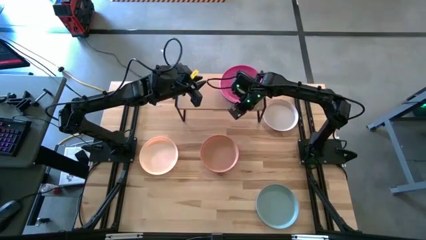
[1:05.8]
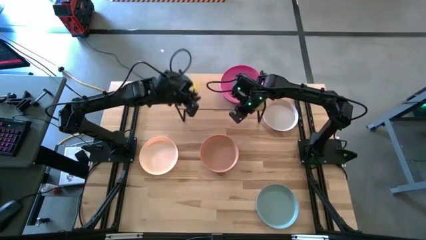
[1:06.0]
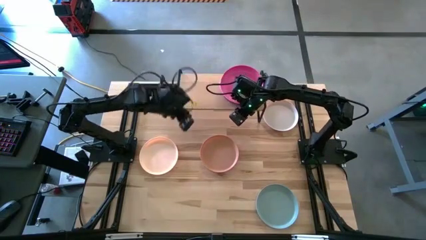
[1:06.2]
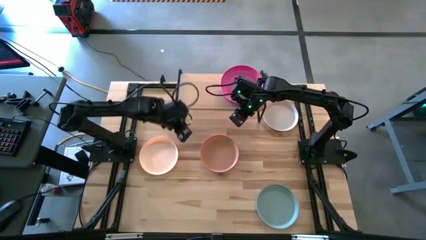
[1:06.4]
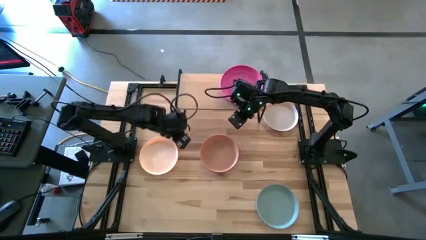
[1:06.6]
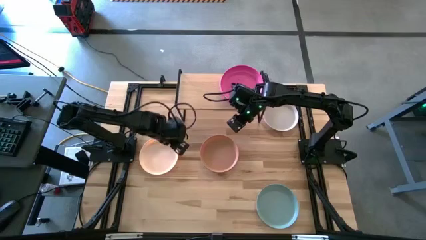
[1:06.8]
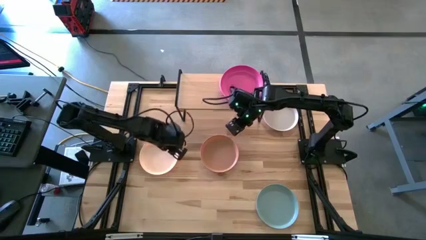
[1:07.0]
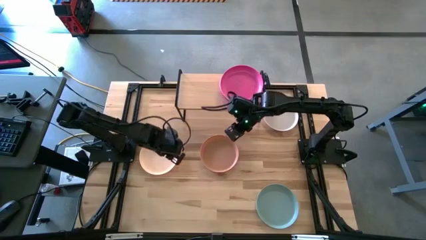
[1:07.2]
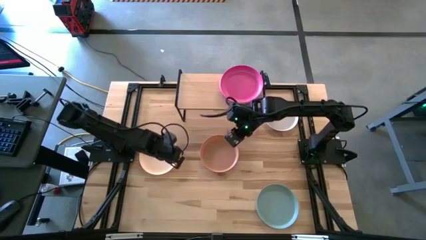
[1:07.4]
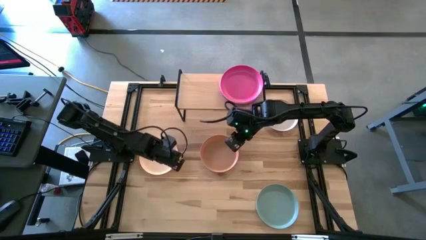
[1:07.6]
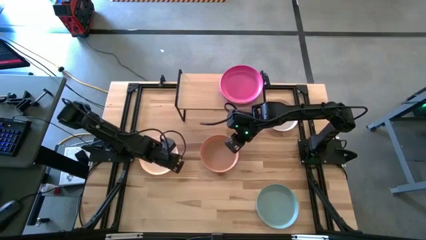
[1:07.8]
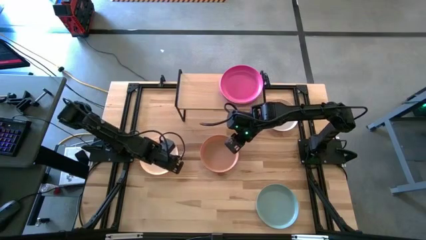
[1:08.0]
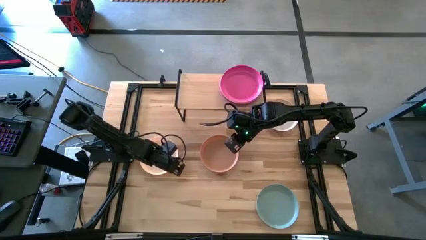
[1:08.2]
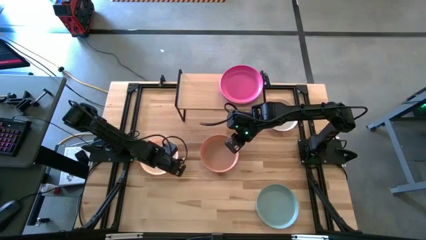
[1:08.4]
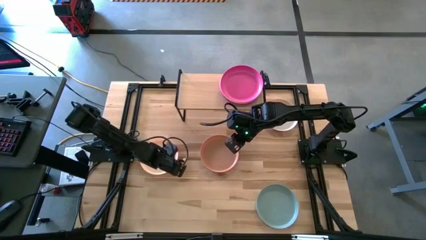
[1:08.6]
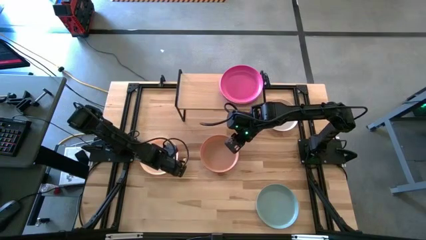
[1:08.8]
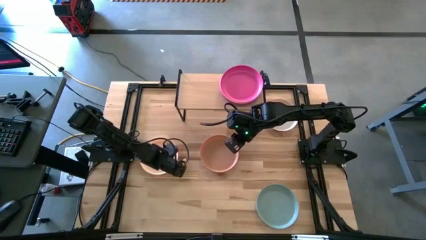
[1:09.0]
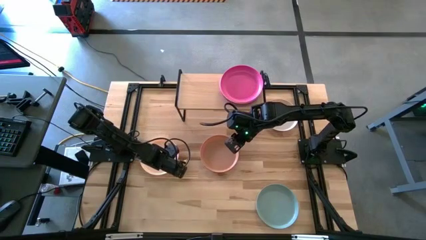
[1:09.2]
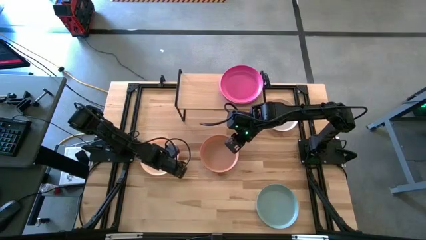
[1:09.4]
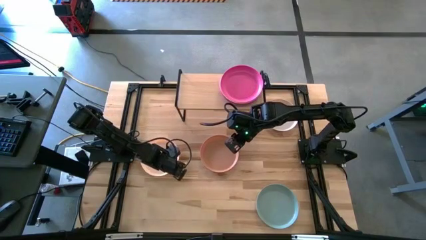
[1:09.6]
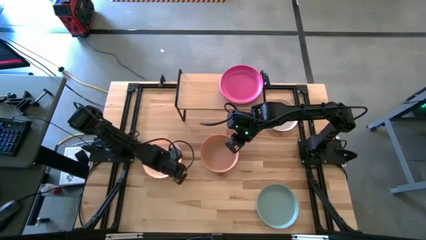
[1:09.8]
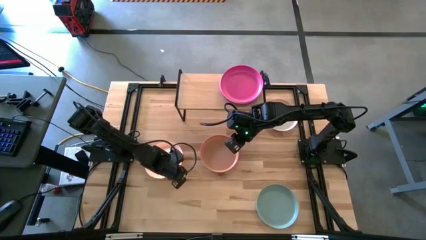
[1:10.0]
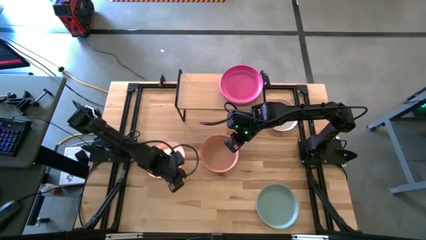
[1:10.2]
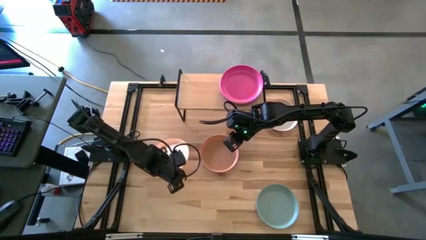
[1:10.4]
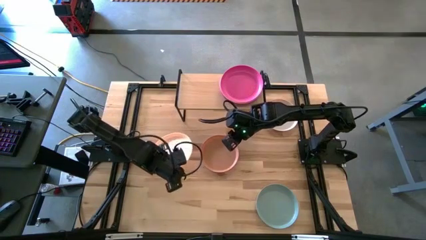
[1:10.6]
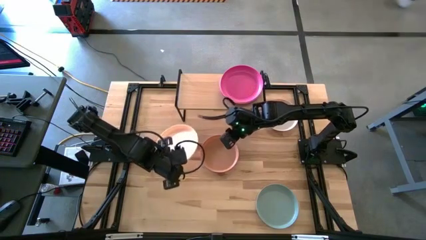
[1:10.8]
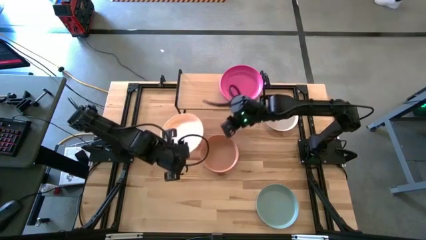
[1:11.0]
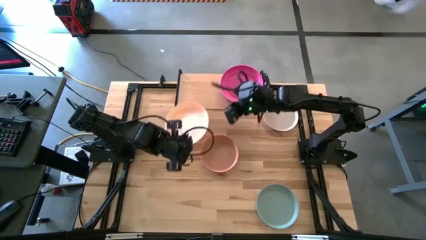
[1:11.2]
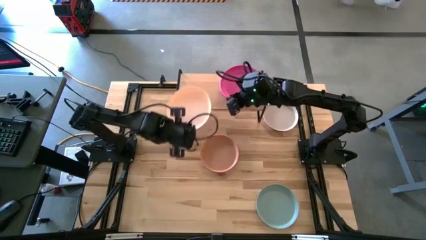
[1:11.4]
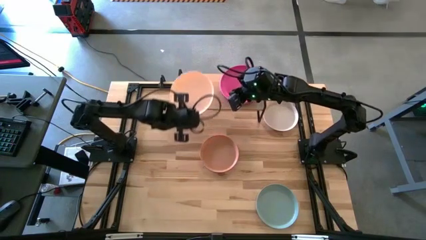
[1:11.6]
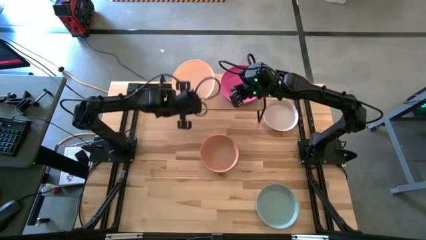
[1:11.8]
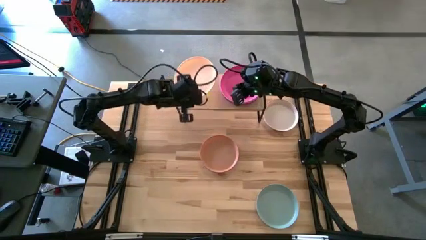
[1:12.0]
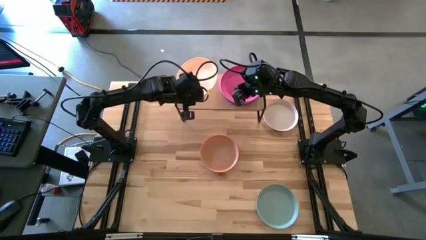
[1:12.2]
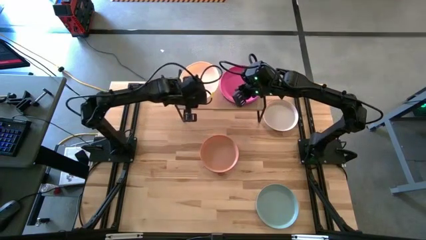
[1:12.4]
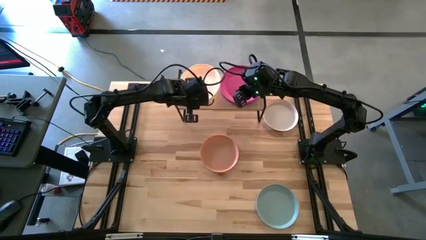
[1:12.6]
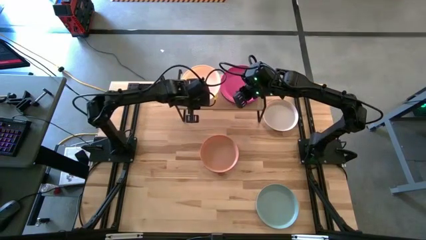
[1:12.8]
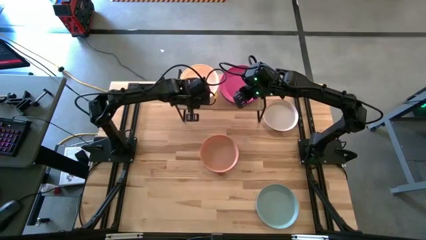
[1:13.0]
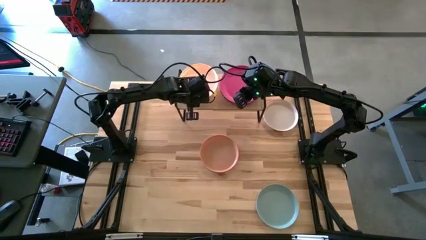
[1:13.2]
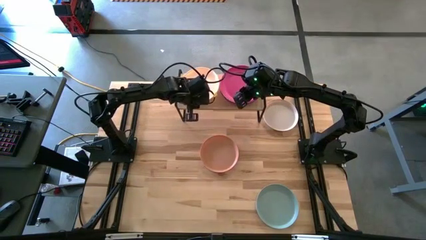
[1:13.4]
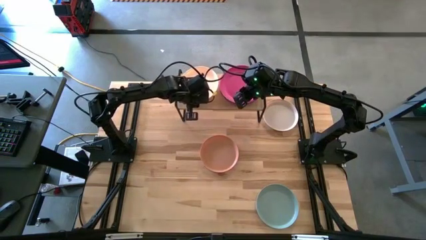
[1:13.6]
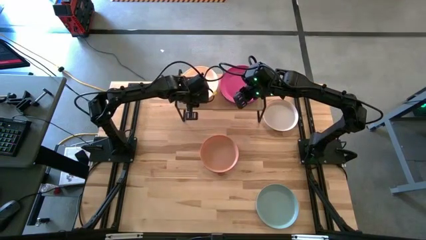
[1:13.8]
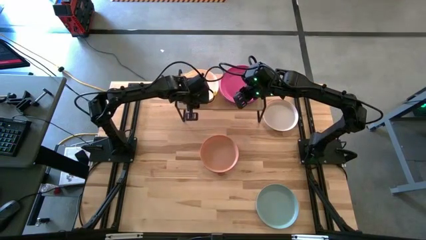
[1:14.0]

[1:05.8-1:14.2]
Task: Place and stack plates onto a shelf
Put the left white plate on the shelf

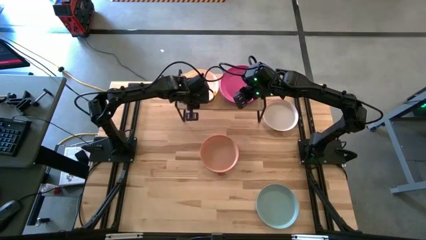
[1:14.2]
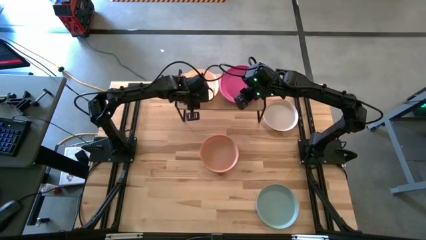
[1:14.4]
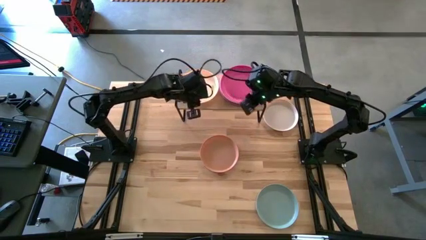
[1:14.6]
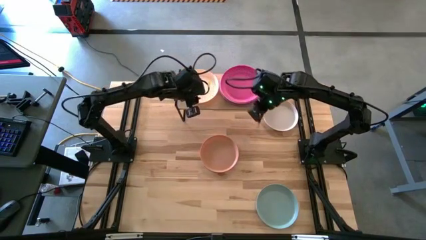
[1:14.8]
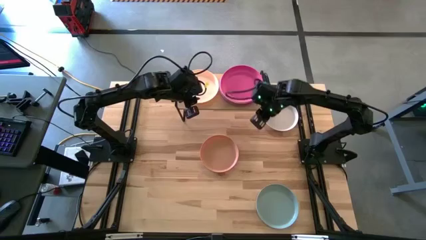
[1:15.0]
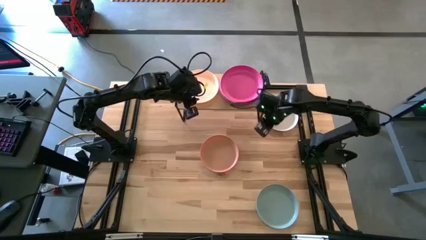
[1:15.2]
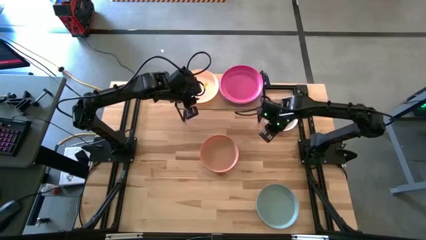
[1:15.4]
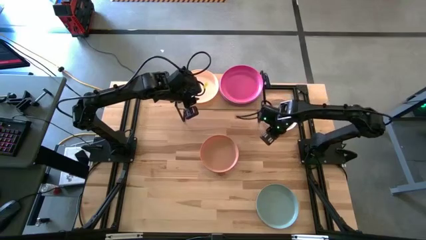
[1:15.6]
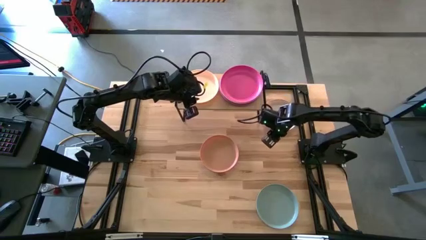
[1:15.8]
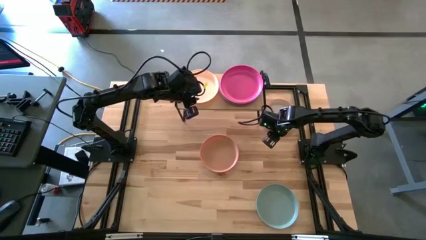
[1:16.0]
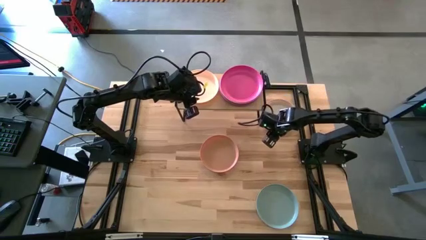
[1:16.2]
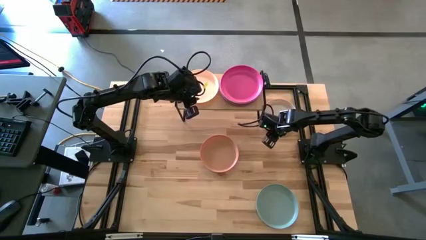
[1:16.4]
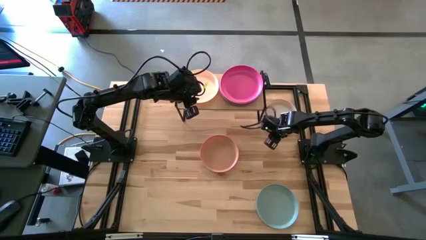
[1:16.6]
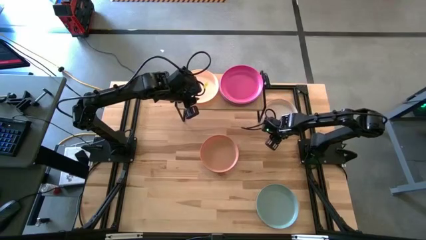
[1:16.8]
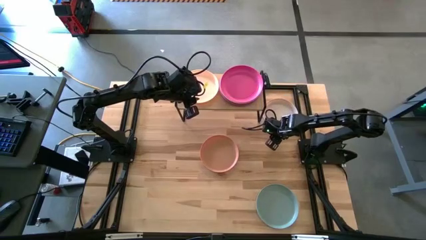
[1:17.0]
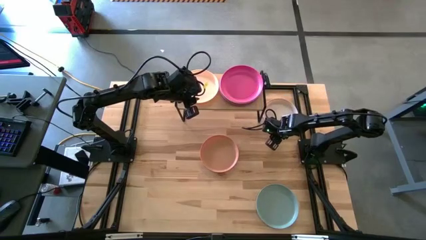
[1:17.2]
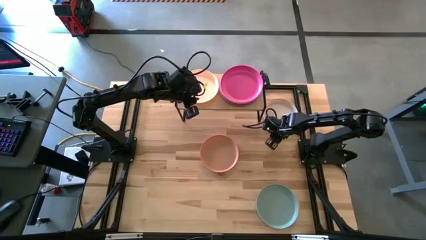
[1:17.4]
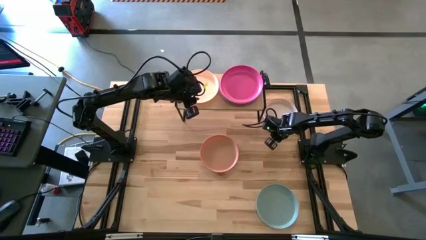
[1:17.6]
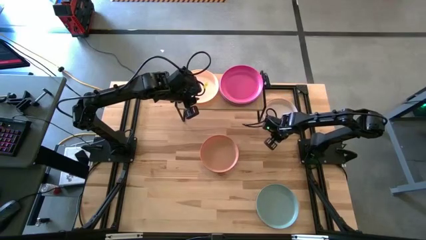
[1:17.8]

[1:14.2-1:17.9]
Stack the white plate on top of the white plate

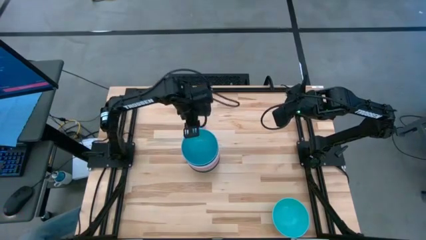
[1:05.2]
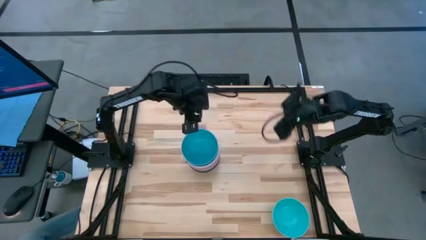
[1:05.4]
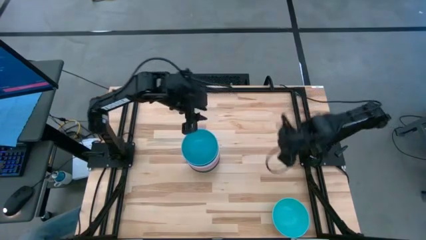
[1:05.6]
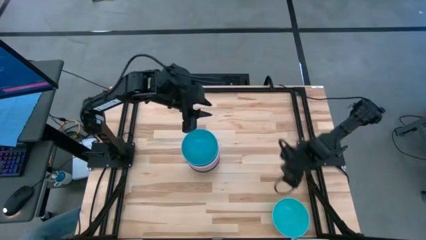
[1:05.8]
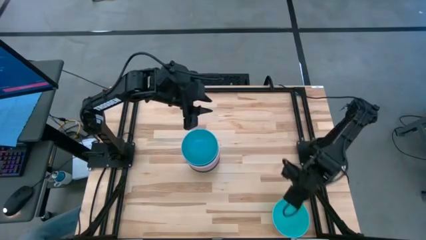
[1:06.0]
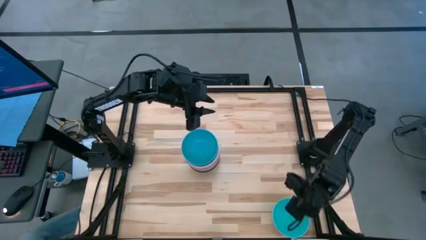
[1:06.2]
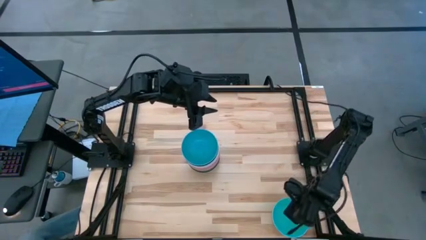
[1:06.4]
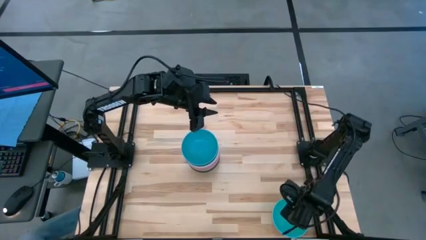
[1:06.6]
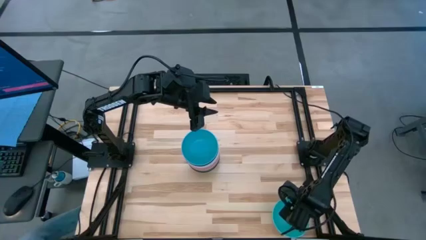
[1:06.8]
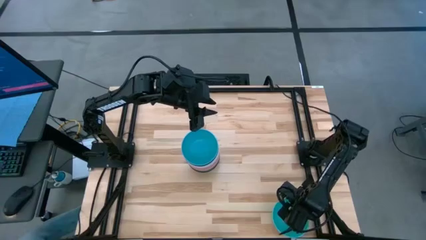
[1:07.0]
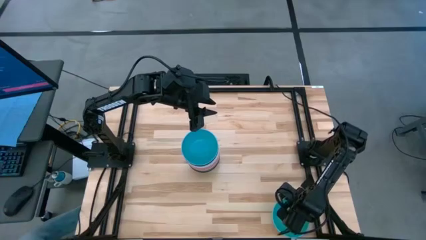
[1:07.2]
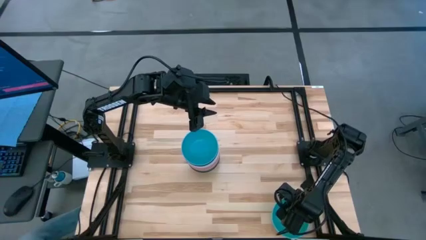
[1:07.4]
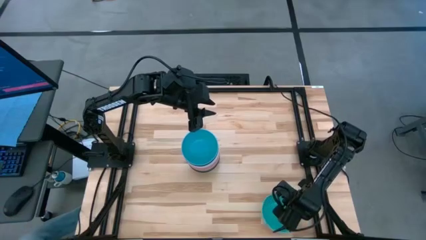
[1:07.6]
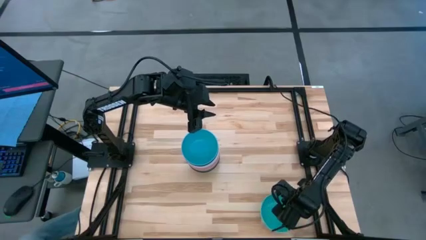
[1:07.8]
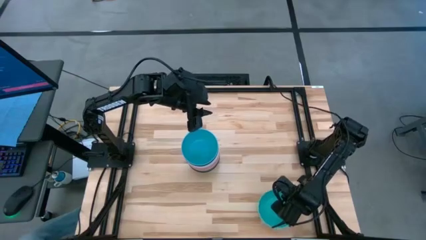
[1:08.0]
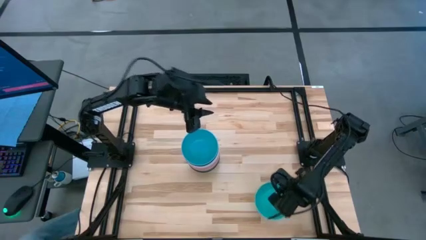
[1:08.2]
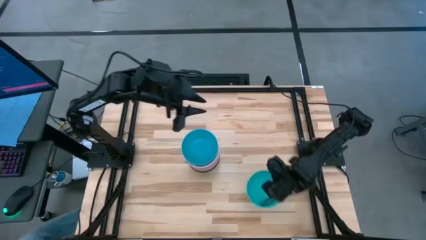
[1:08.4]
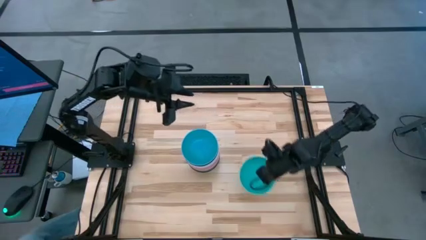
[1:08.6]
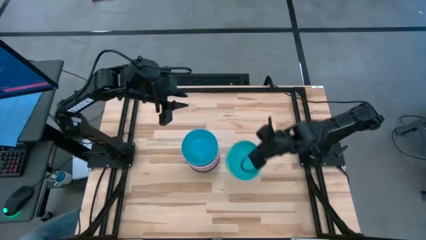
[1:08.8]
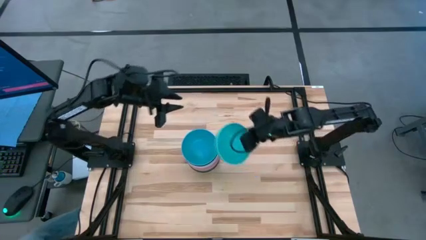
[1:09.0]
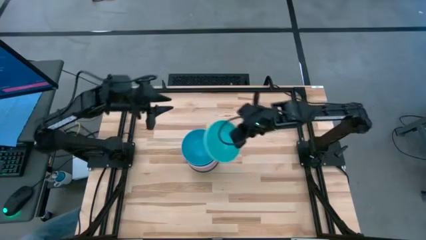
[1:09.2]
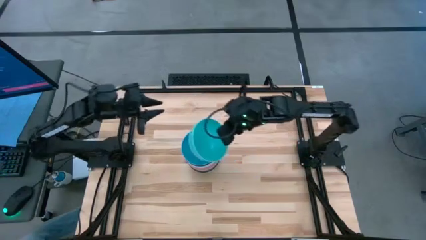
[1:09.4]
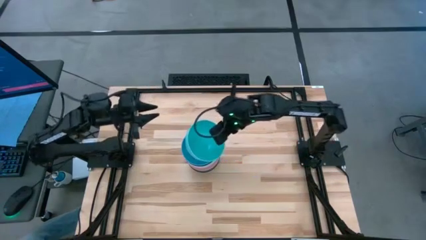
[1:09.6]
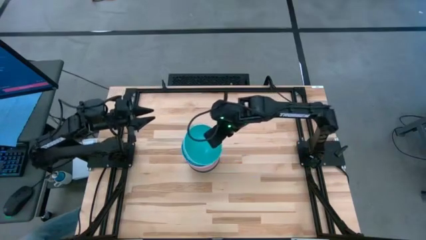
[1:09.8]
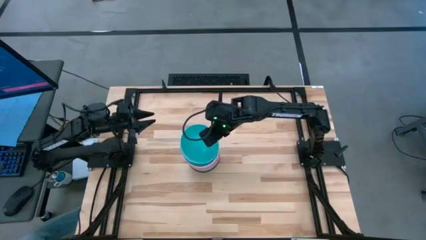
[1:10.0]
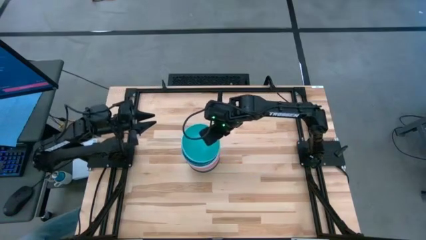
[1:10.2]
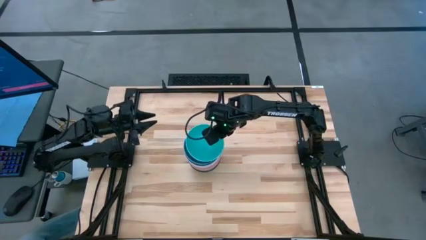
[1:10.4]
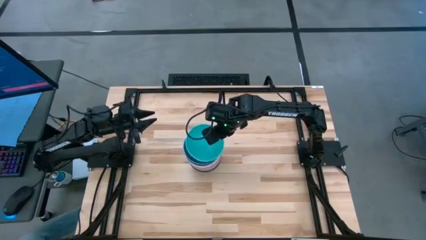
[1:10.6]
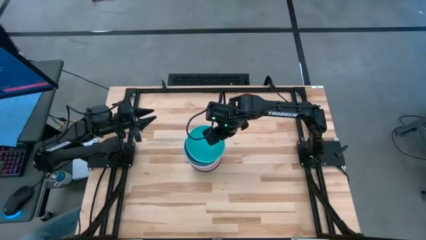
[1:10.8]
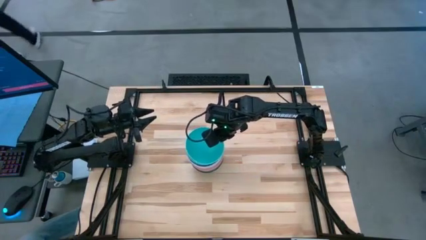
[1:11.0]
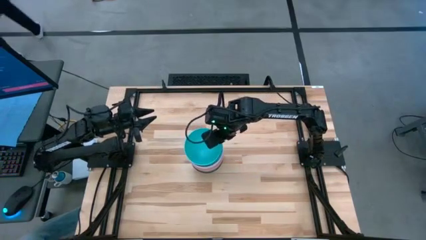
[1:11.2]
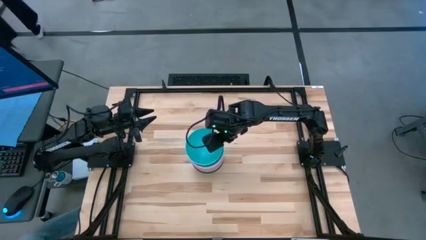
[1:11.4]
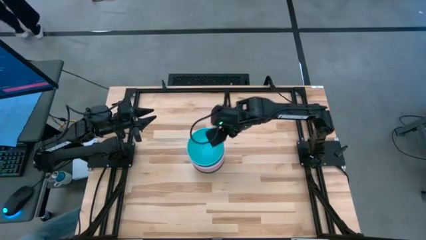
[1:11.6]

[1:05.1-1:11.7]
Task: Nest bowls inside each other
Stack the blue bowl on top of the top blue bowl
